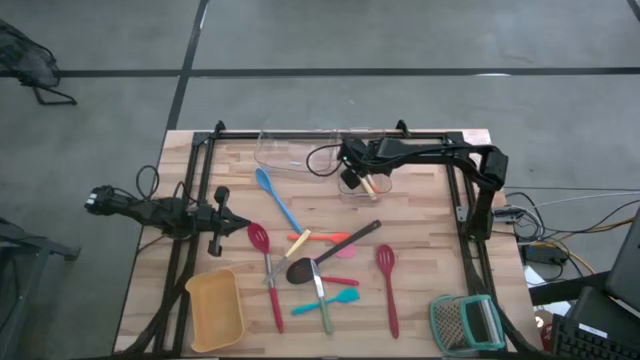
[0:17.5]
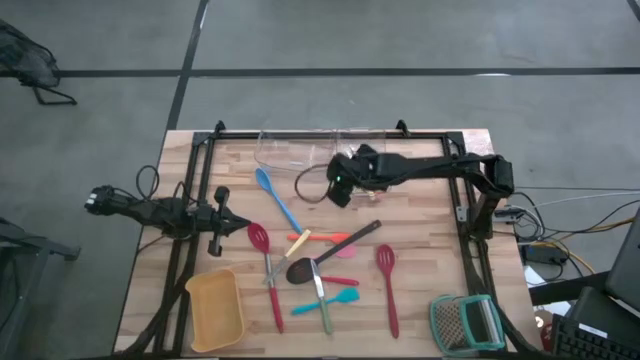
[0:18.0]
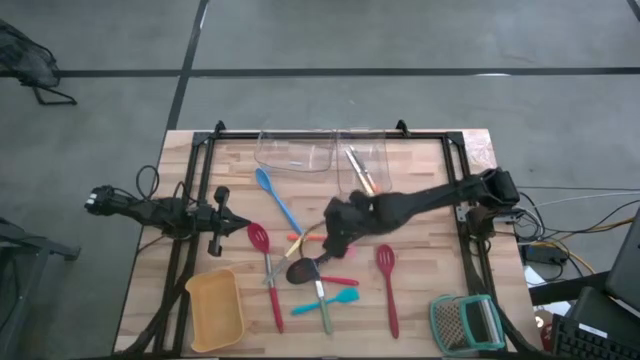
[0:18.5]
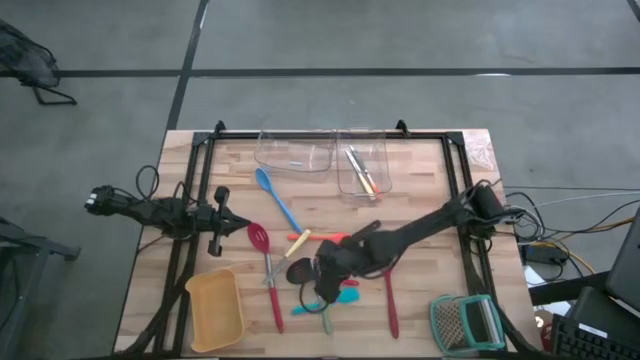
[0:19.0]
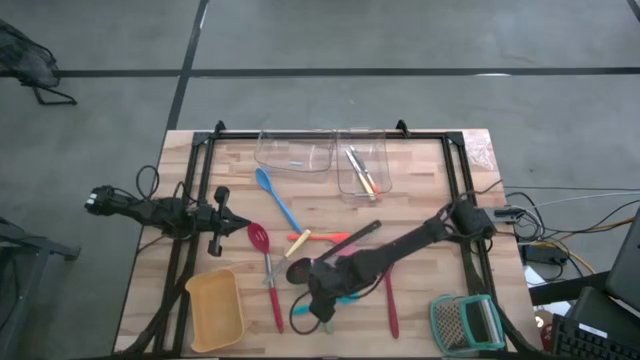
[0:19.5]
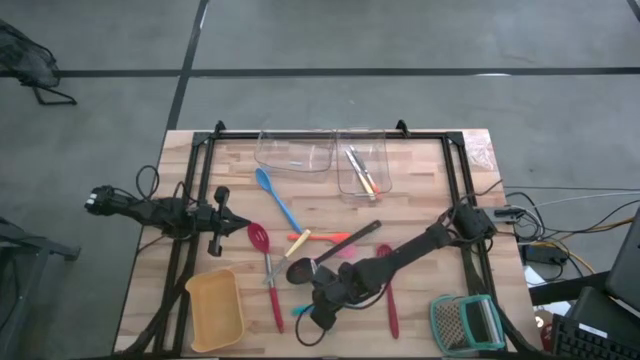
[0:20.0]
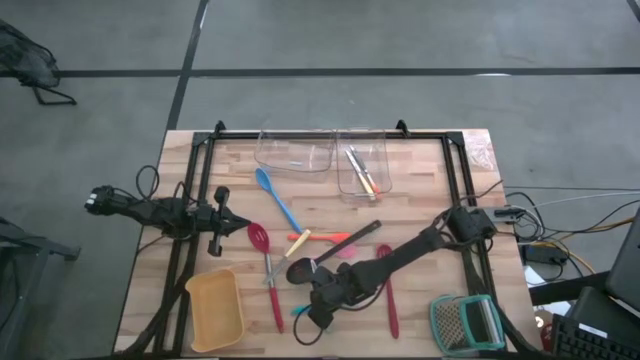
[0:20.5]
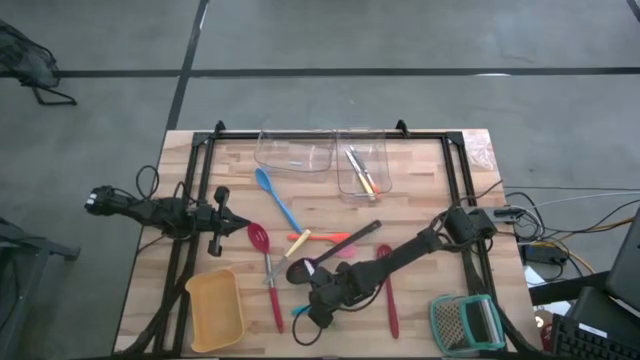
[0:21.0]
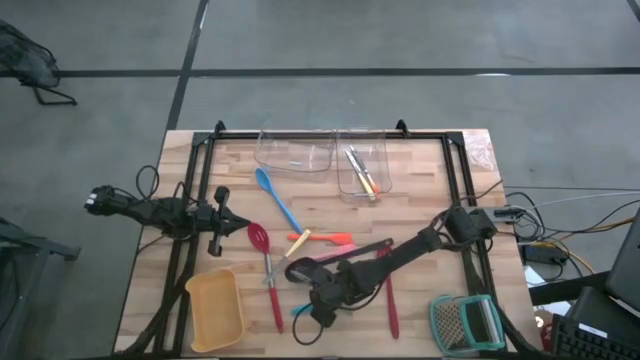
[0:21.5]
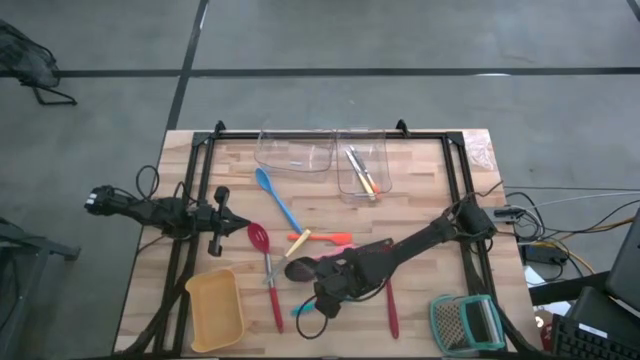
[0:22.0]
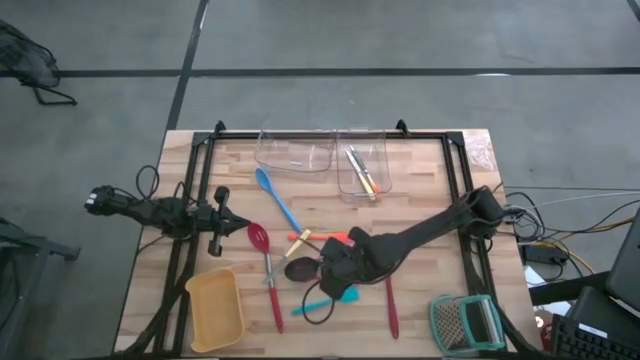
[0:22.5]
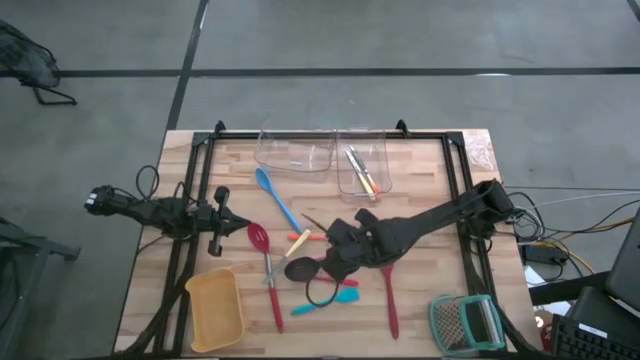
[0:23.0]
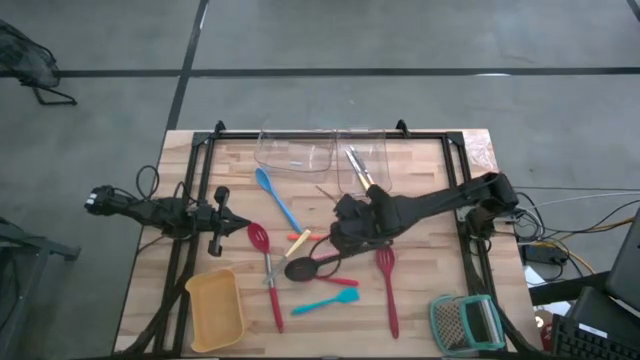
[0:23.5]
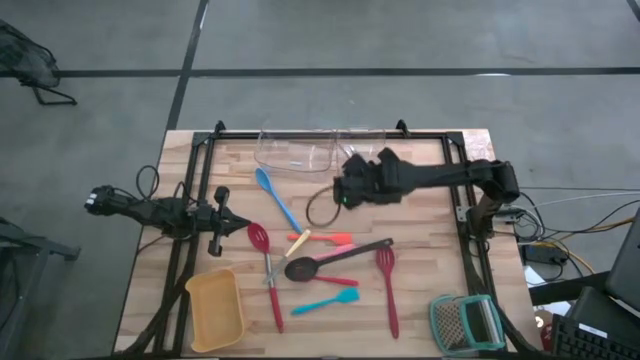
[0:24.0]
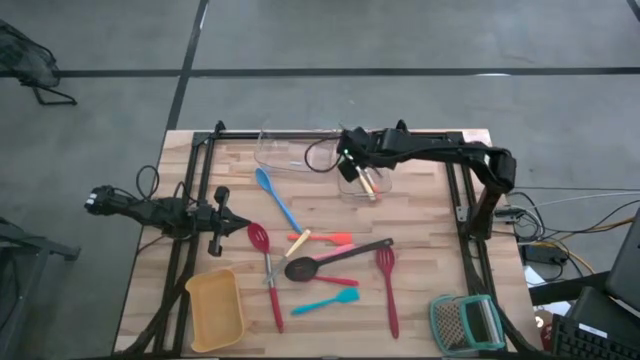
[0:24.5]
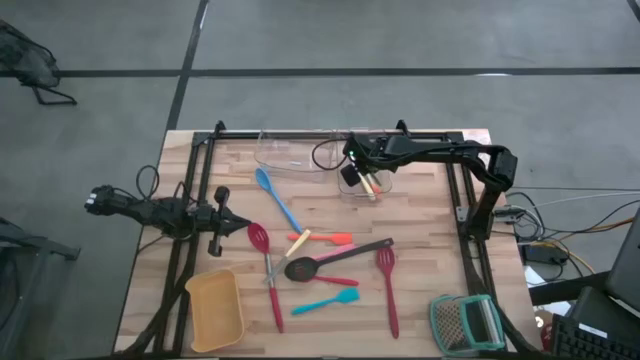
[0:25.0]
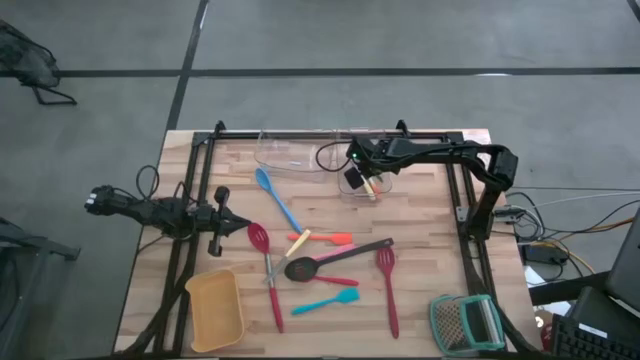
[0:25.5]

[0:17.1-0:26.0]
Task: Pick & Place Kitchen Items
Put the green knife into the right transparent bin

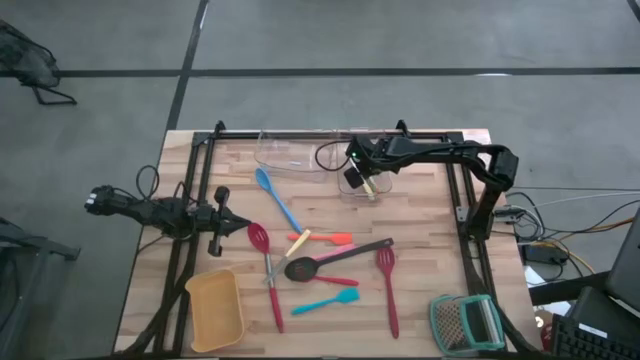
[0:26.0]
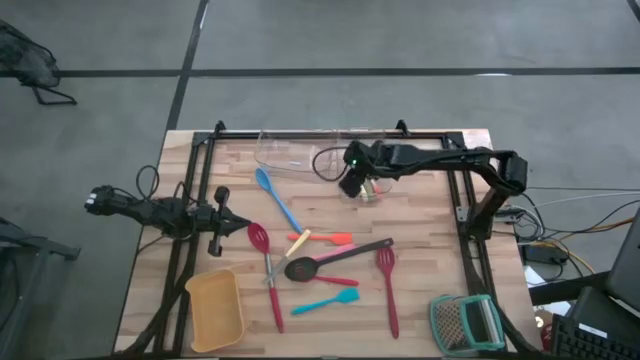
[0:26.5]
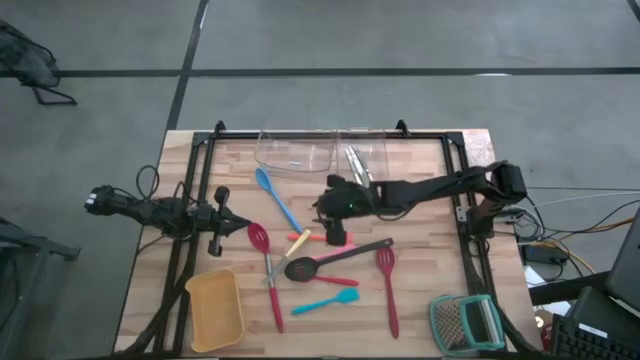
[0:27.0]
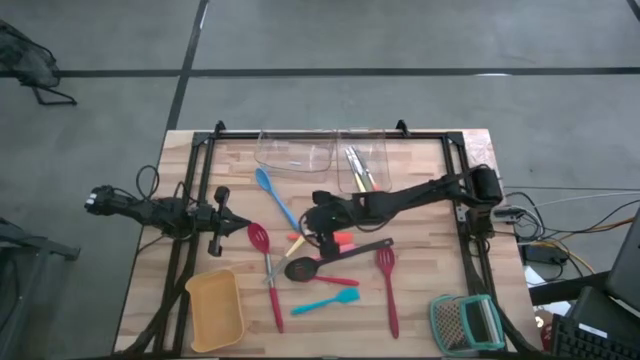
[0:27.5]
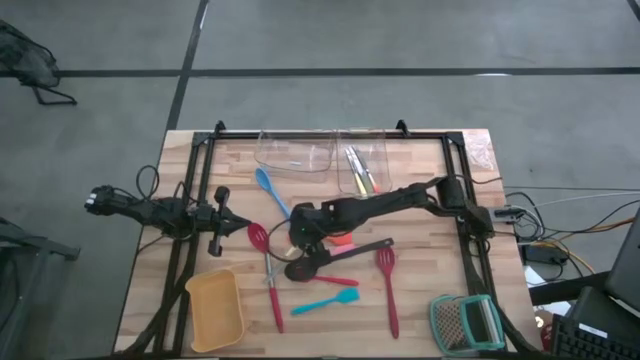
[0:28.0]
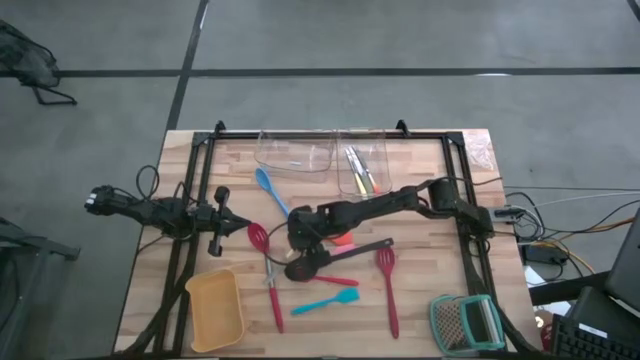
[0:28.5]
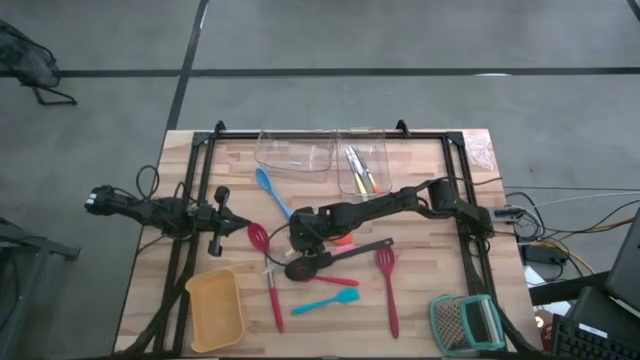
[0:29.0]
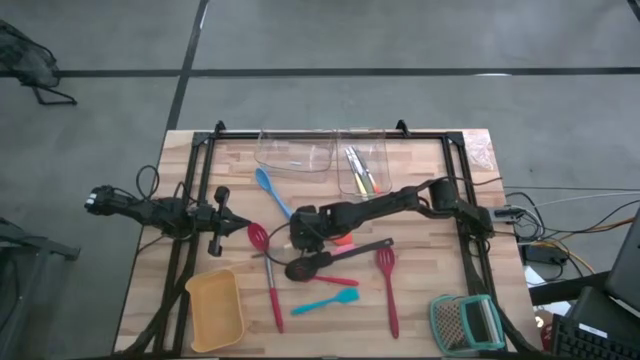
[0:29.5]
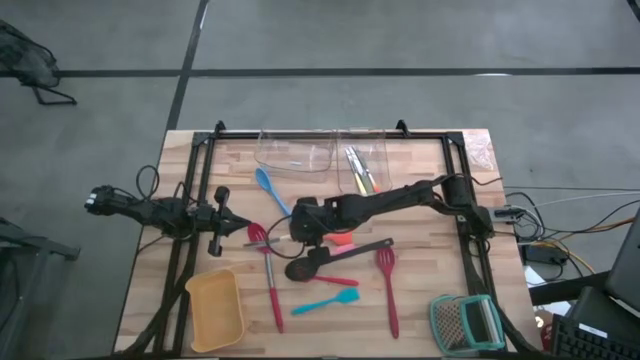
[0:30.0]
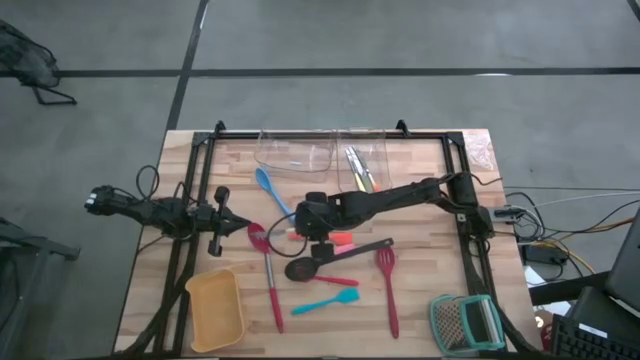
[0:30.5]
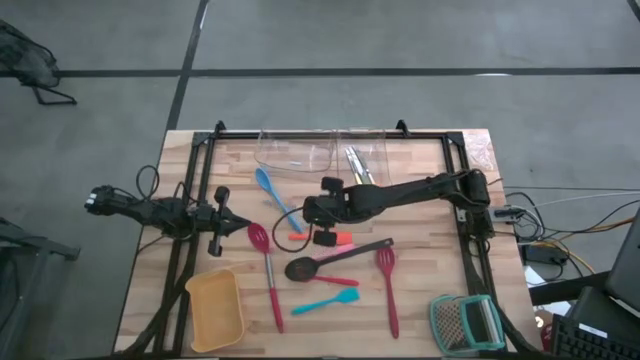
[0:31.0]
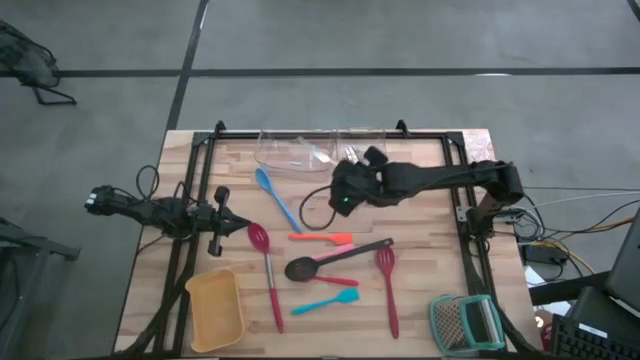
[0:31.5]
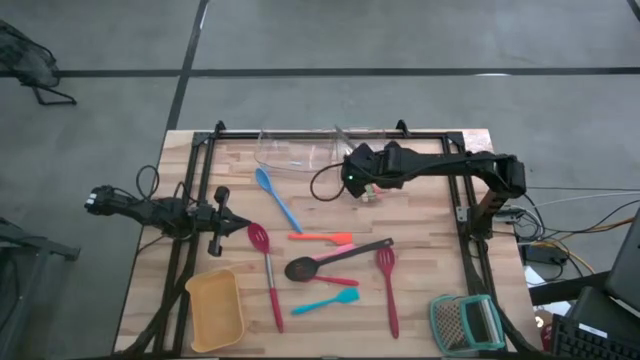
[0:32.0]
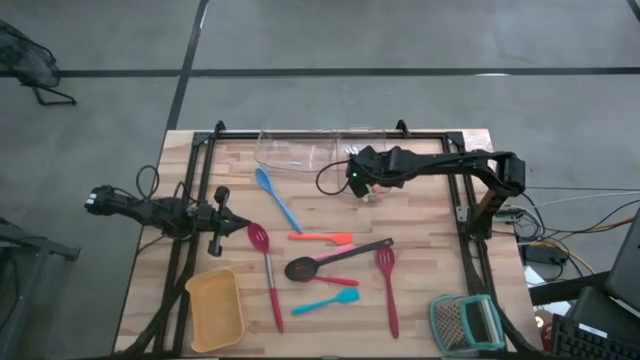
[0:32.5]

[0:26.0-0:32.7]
Put the yellow knife into the right transparent bin

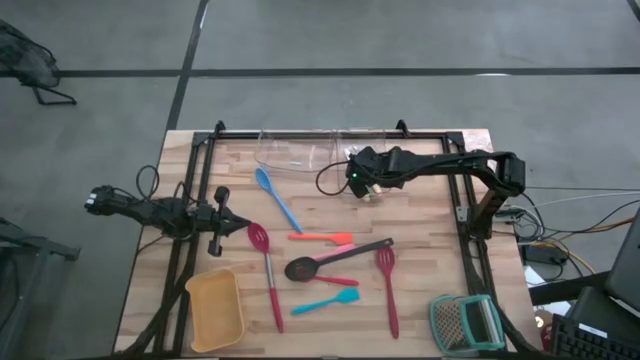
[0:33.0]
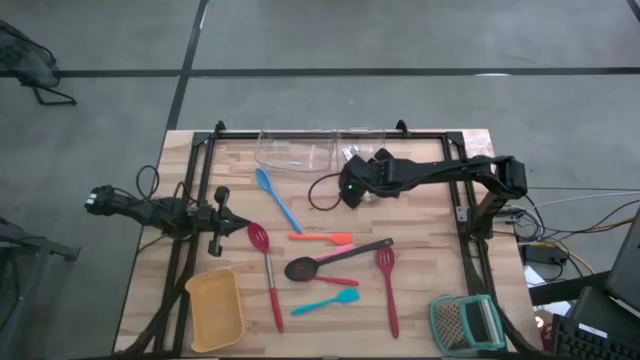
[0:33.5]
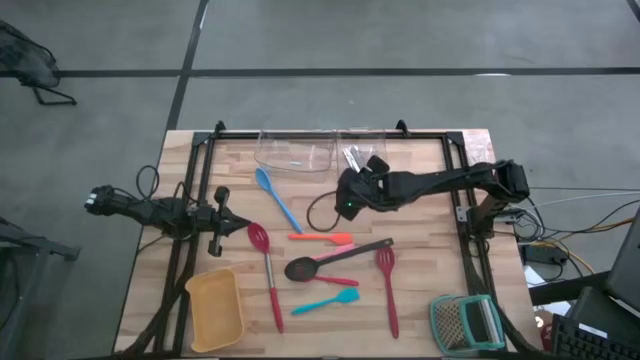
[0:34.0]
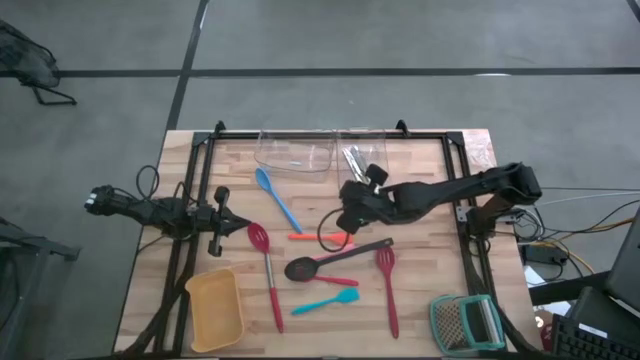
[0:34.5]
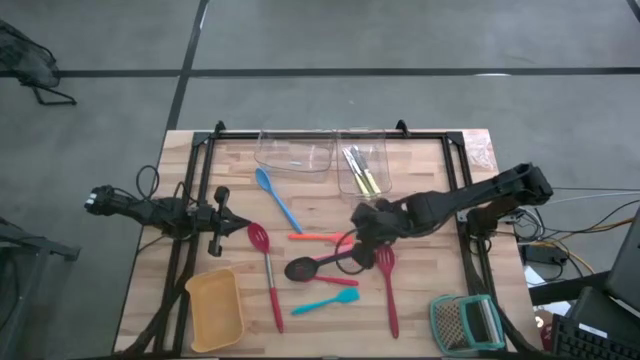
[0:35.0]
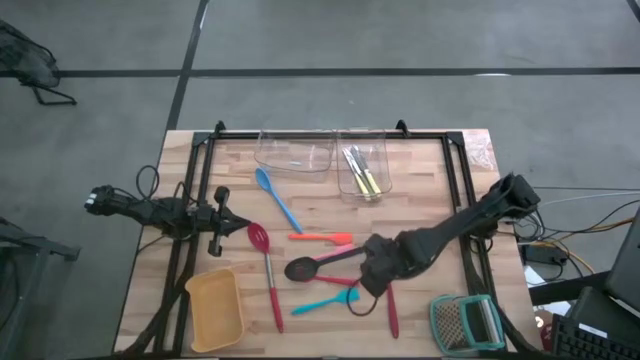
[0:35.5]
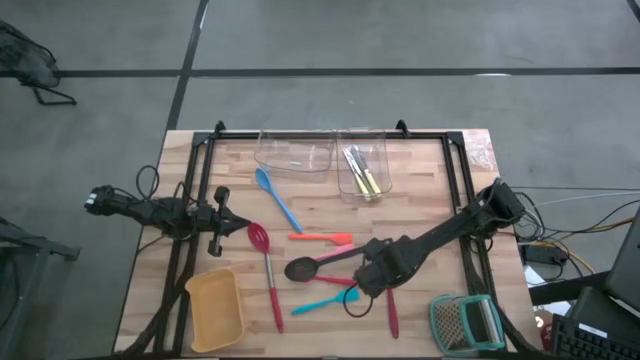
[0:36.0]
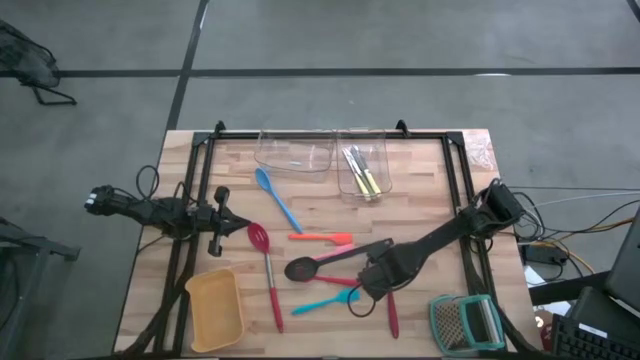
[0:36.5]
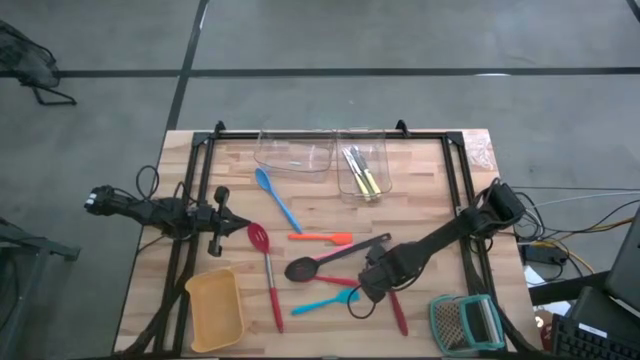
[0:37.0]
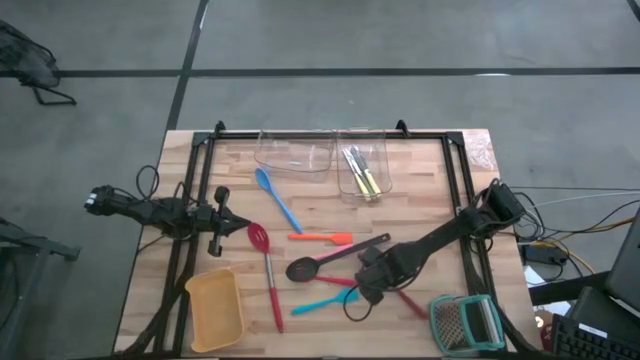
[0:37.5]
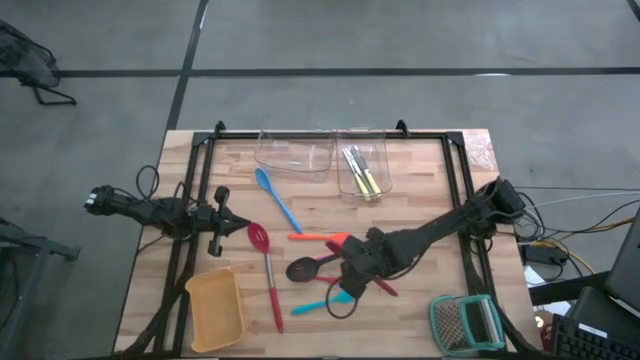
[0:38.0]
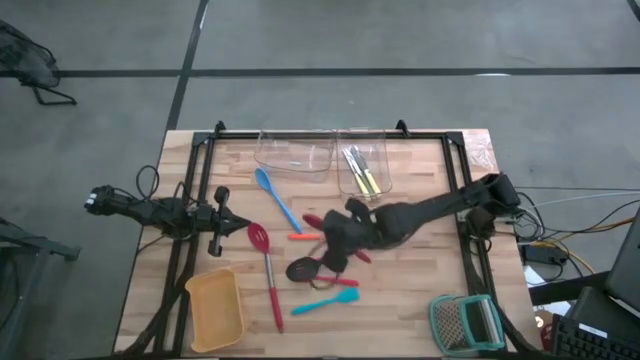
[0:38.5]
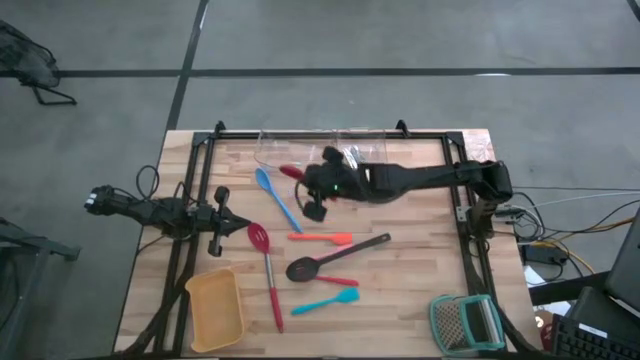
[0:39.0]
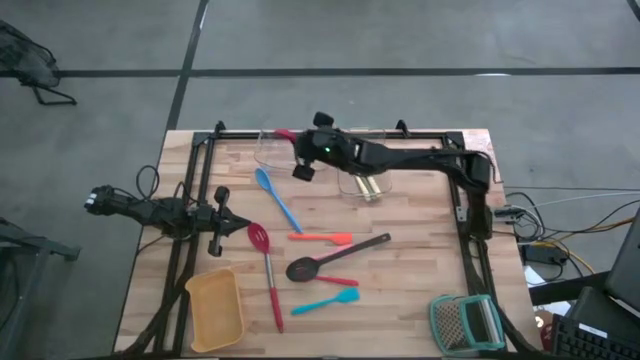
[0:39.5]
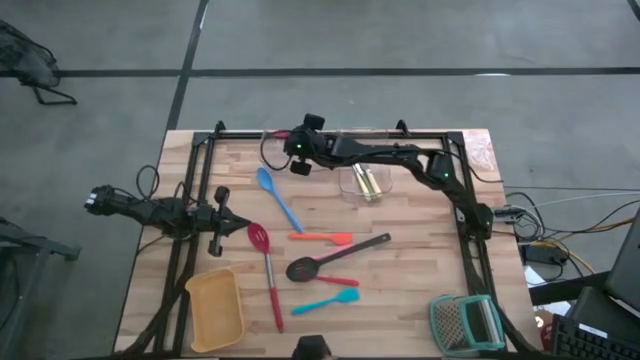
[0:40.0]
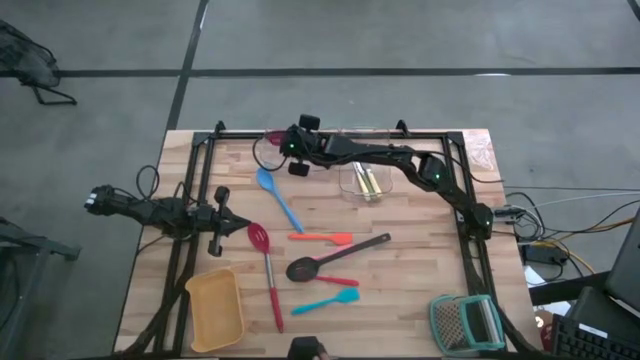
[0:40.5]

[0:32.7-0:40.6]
Put the red serving spoon into the left transparent bin
